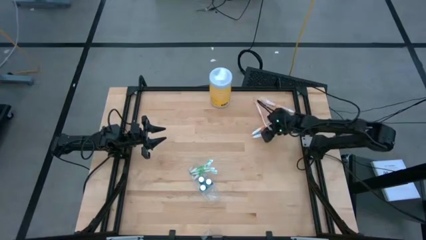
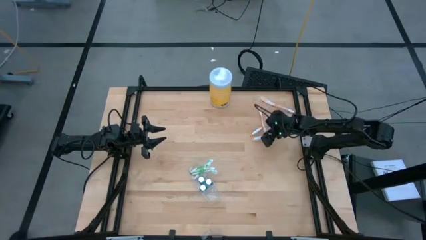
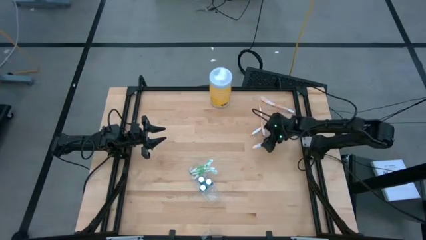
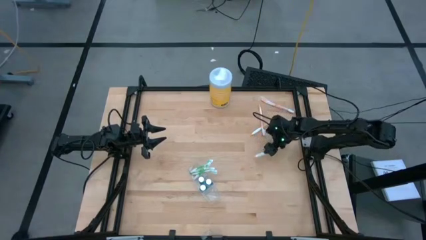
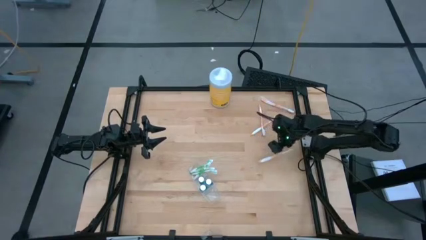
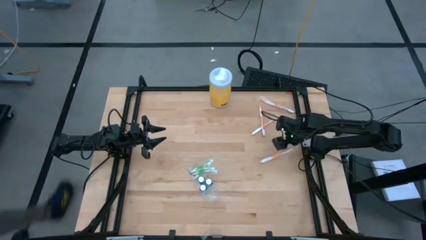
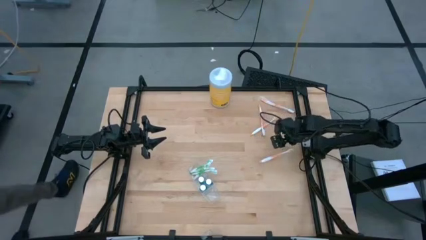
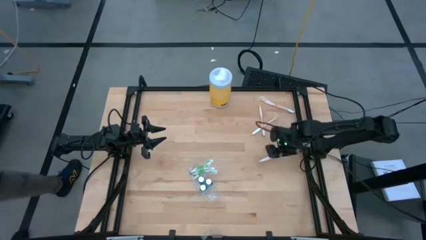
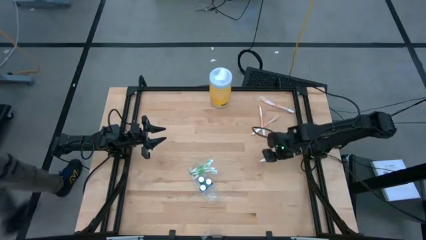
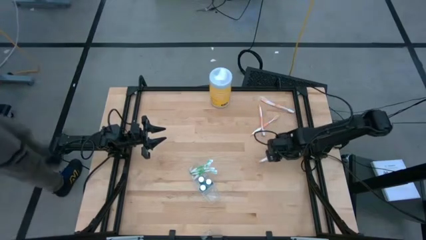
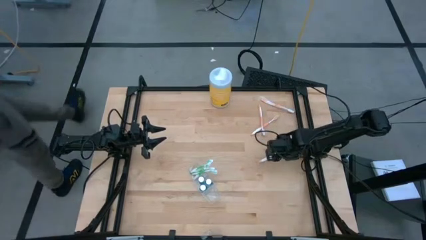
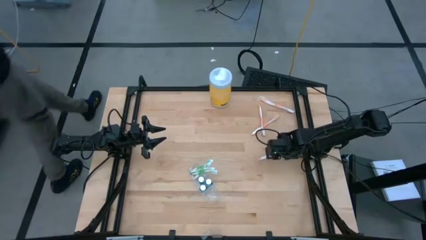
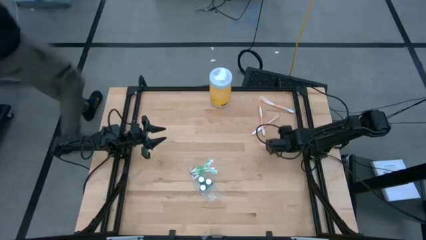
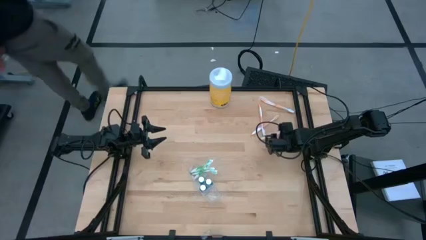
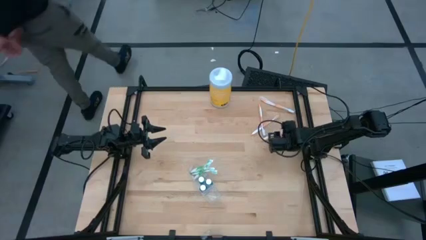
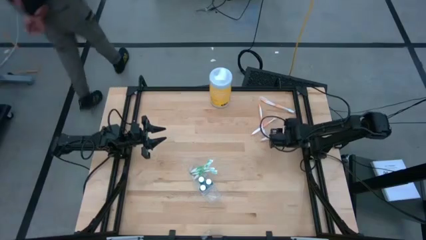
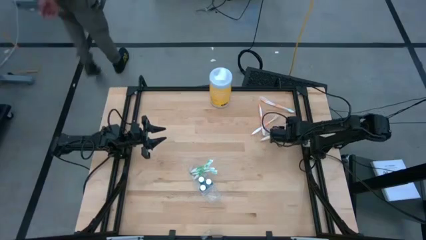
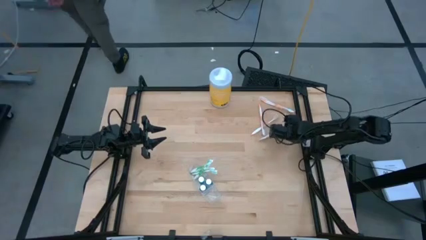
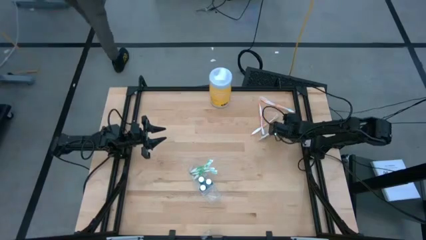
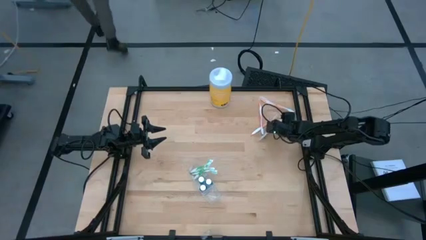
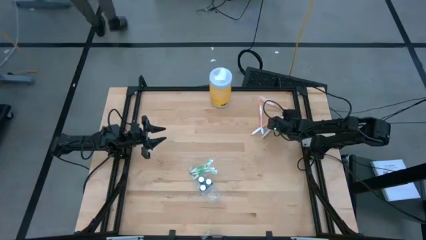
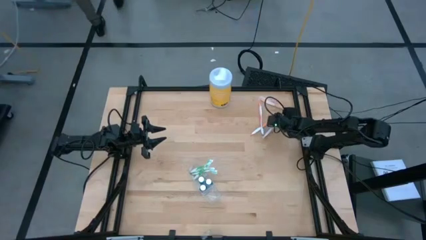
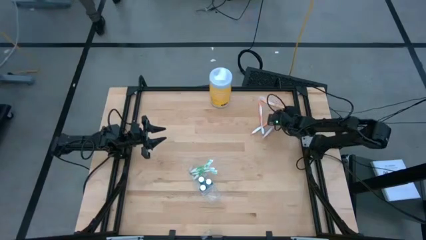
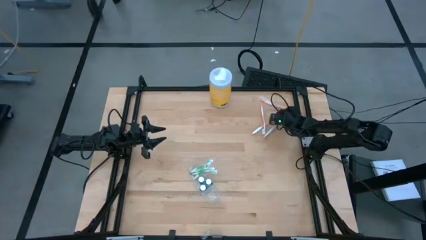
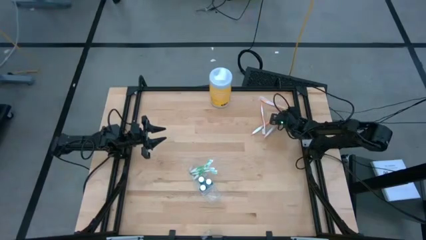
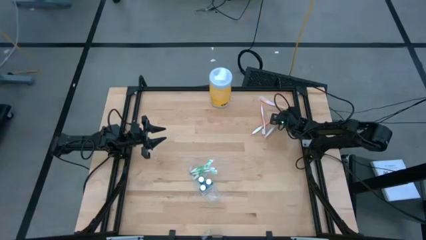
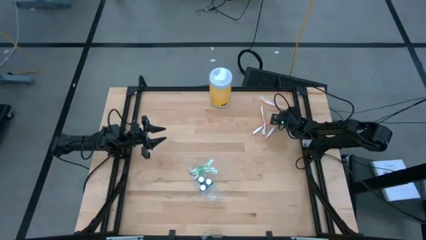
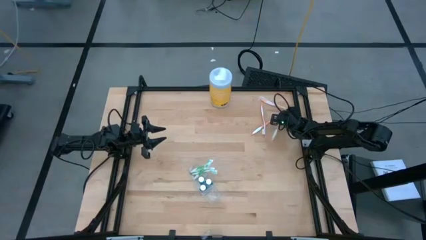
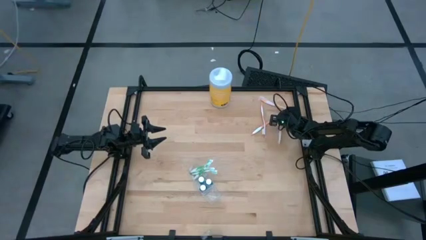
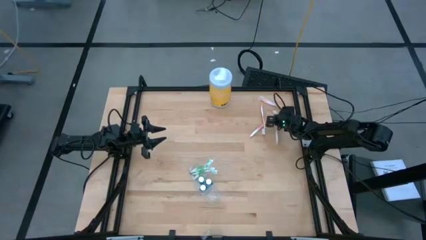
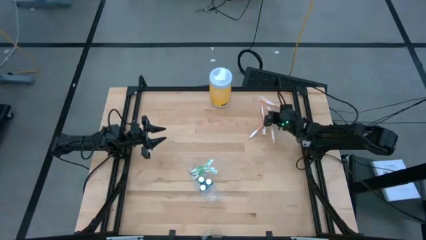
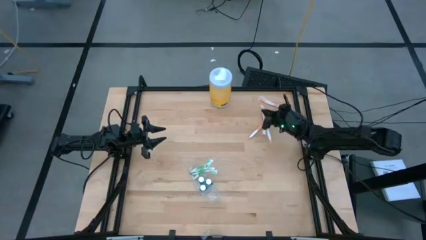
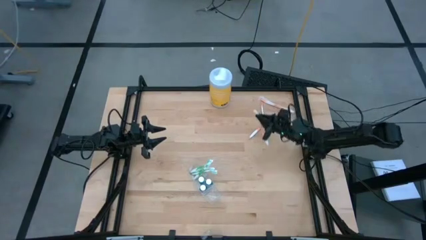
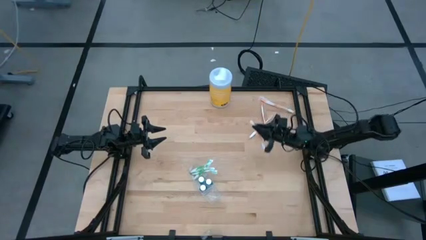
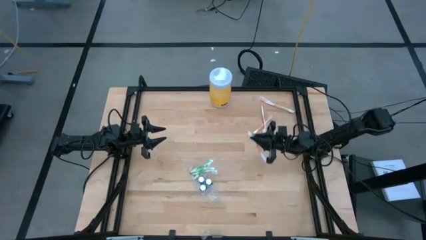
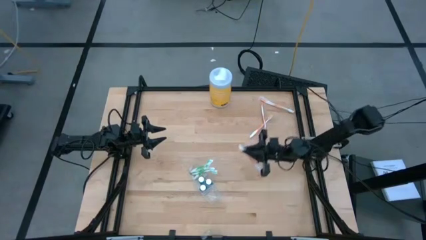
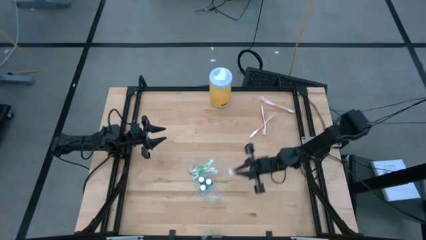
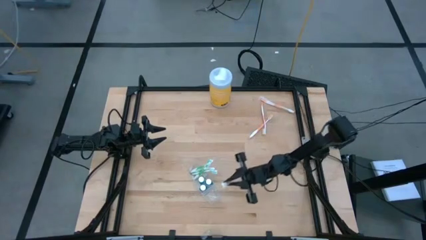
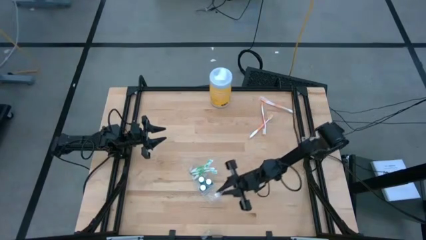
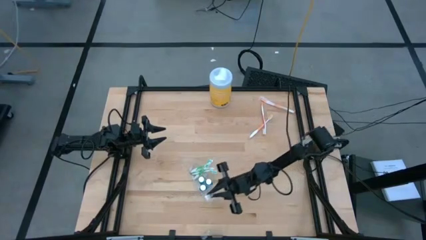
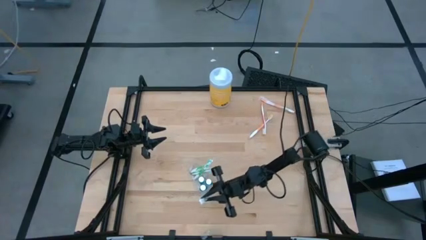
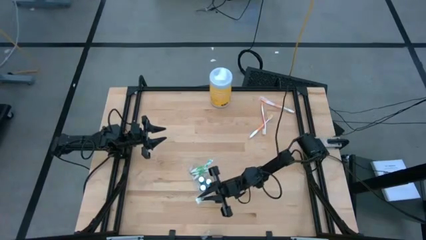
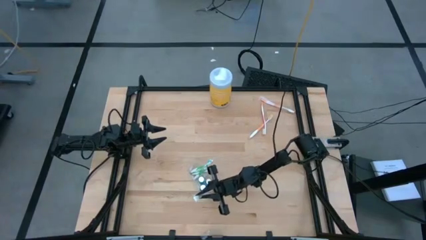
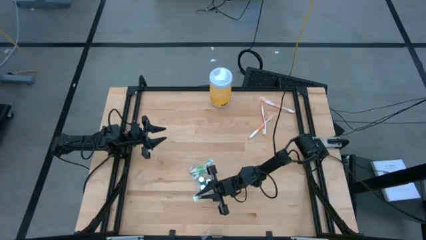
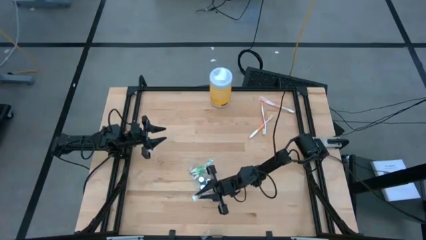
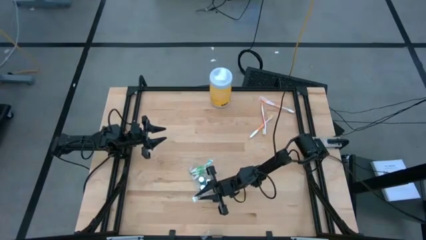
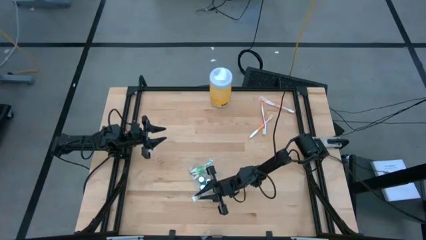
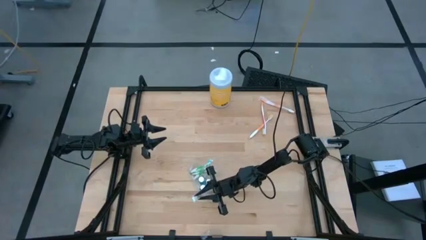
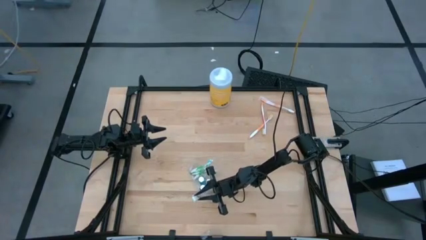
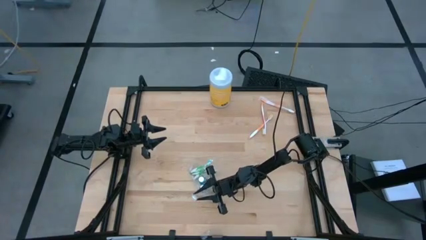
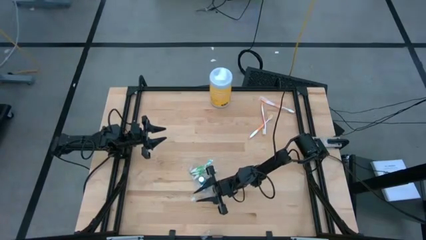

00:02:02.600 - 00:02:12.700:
Task: Pick & Place toothbrushing station
Put the orange toothbrush into the transparent organizer

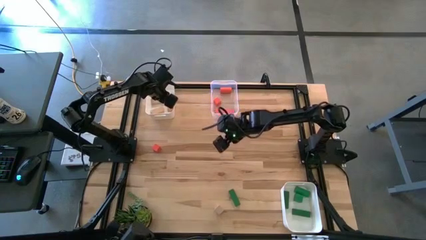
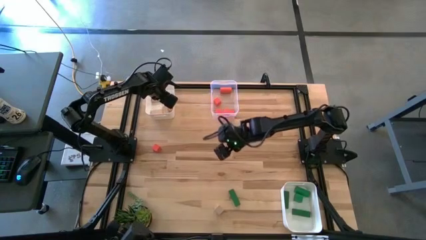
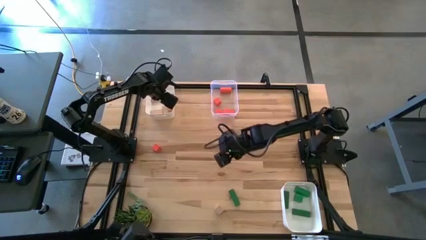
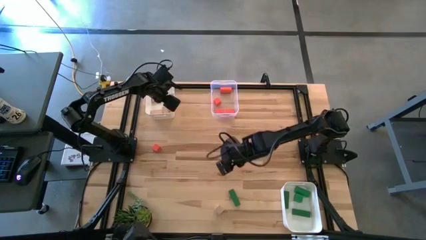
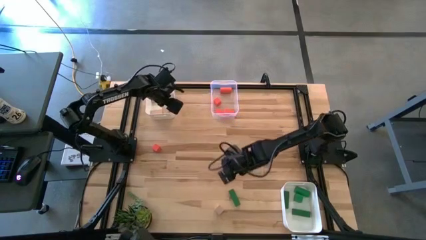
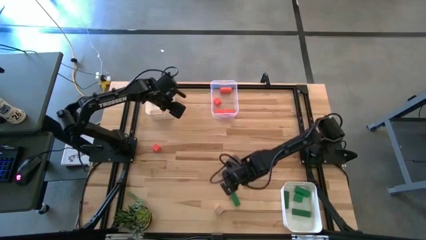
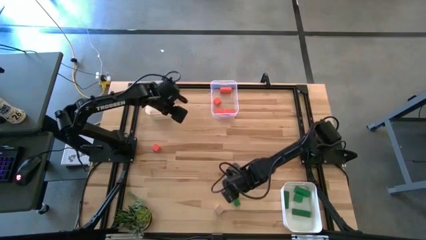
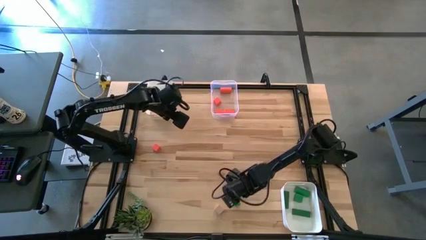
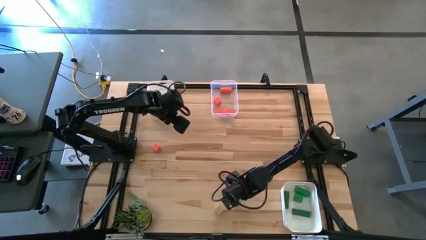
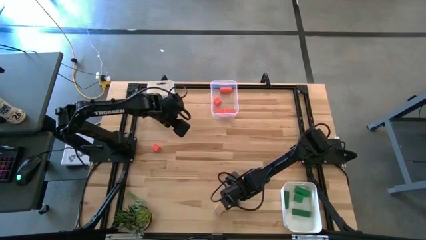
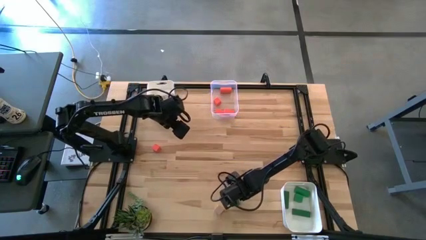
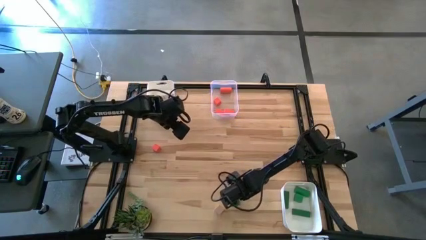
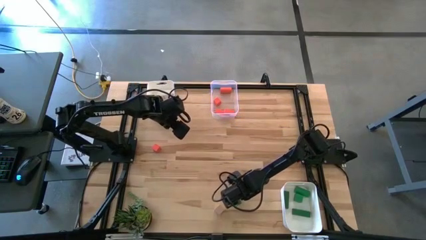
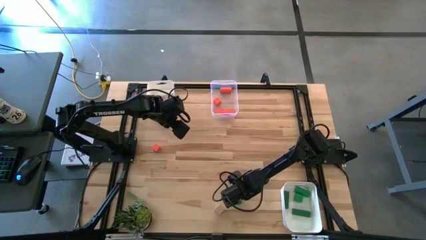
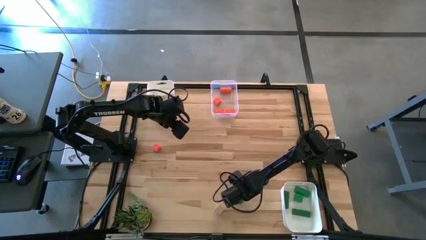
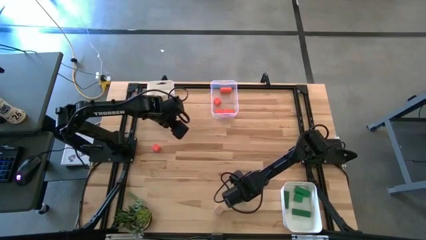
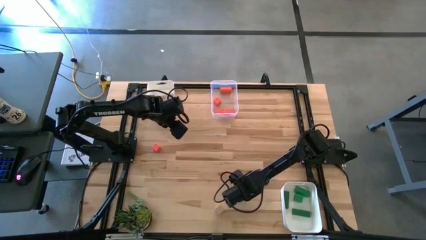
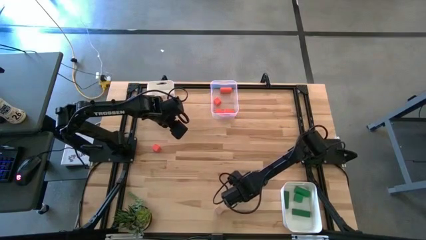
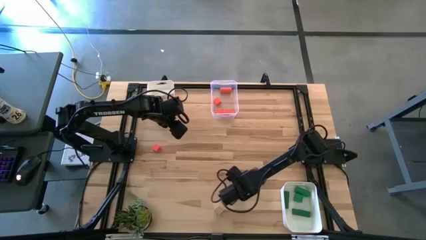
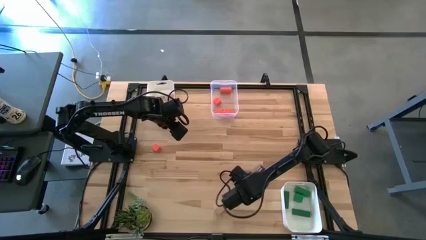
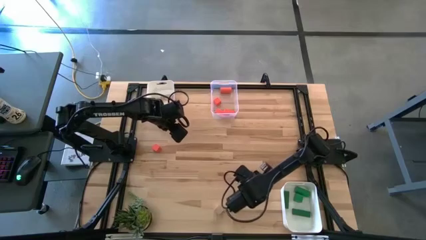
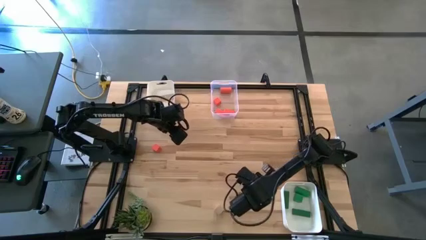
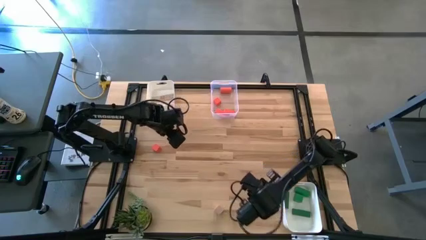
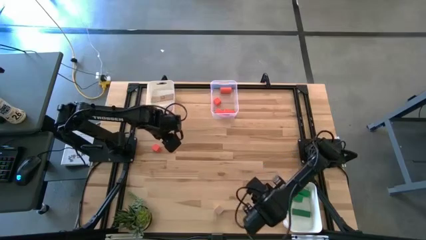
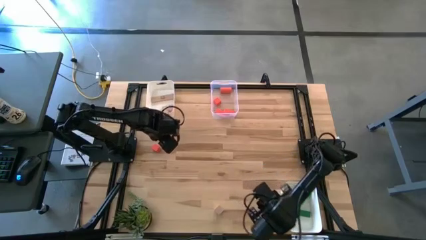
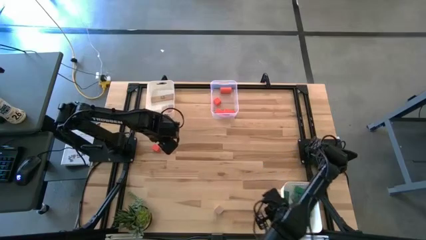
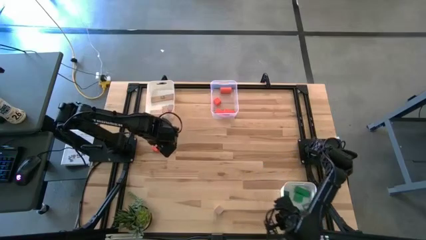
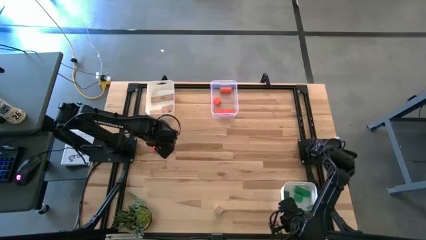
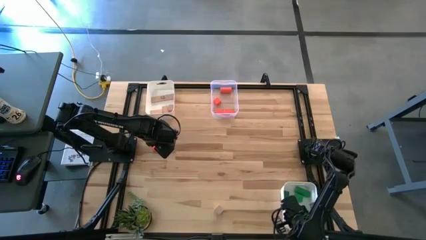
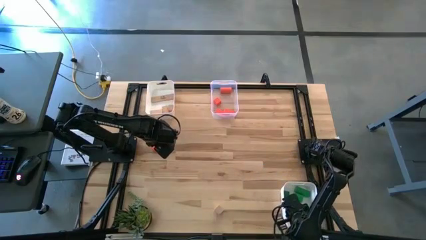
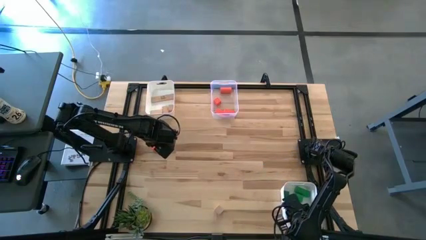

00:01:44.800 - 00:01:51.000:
Task: Sort & place blocks by color
Put the green block into the bottom white bin

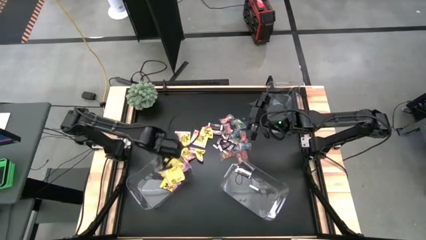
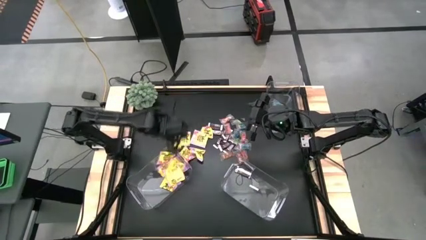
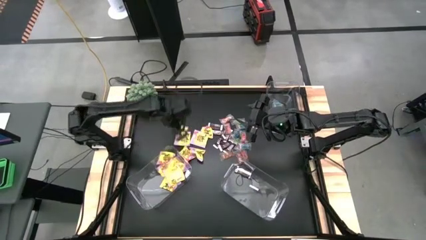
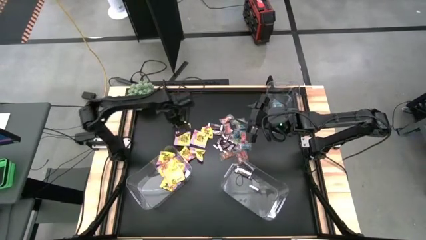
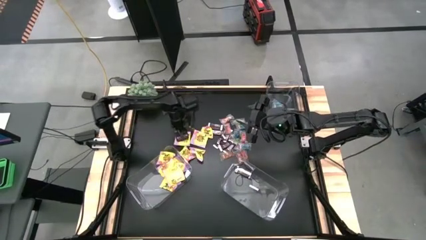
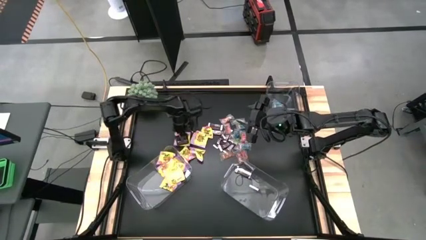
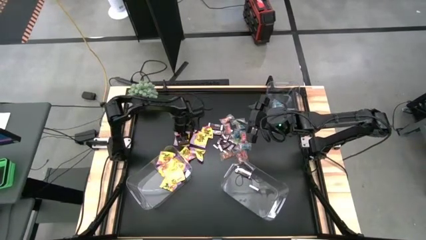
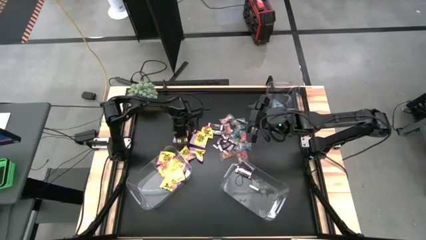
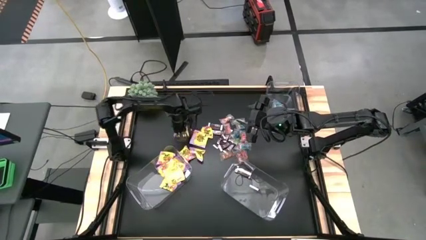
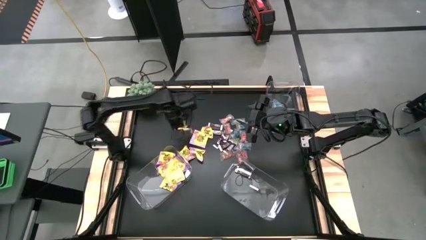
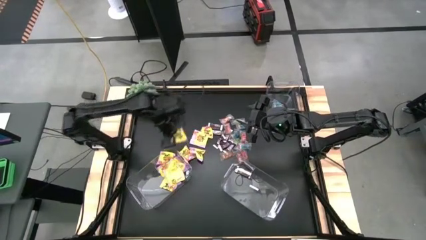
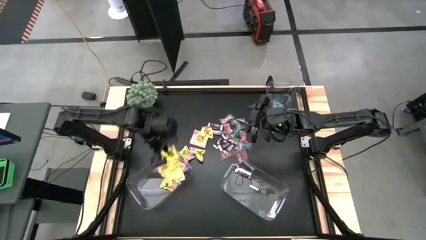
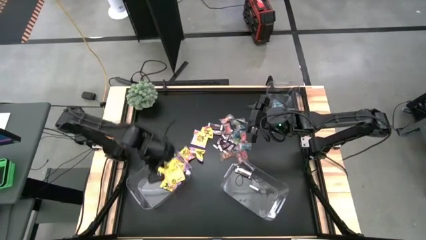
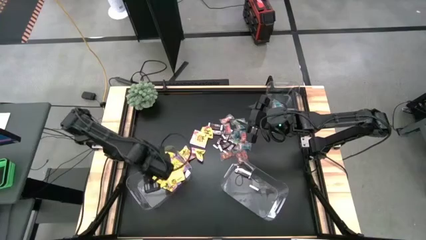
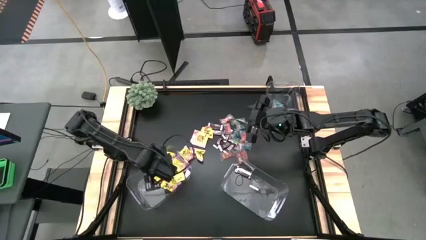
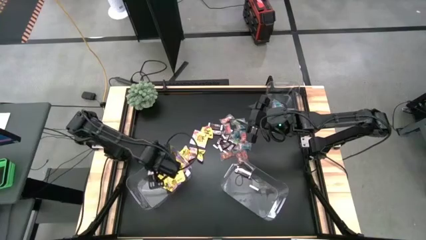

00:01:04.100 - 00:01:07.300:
Task: Sort candy
Put the yellow candy in the bottom left transparent container
